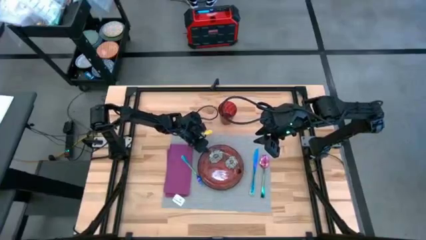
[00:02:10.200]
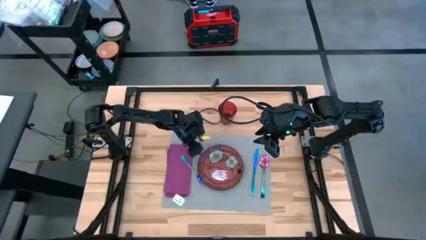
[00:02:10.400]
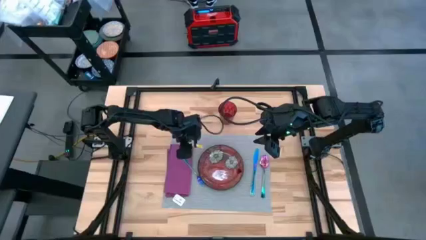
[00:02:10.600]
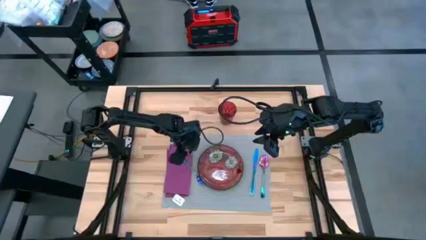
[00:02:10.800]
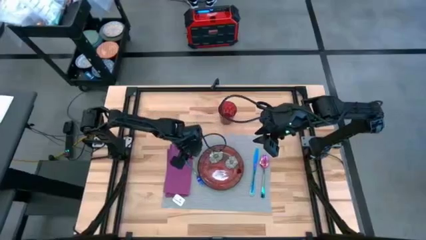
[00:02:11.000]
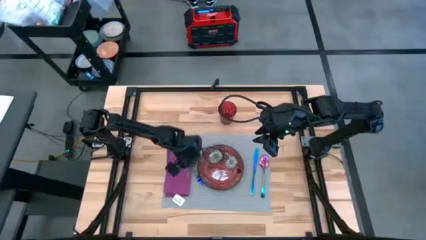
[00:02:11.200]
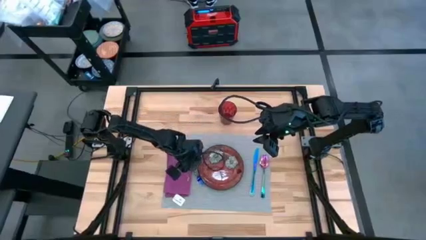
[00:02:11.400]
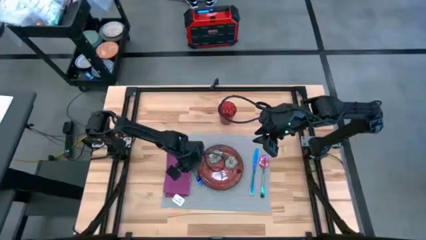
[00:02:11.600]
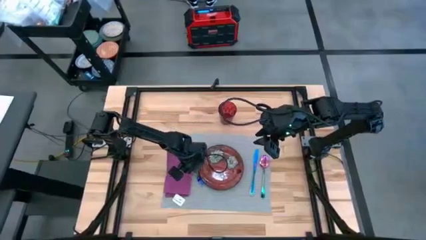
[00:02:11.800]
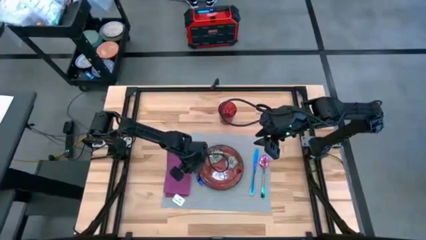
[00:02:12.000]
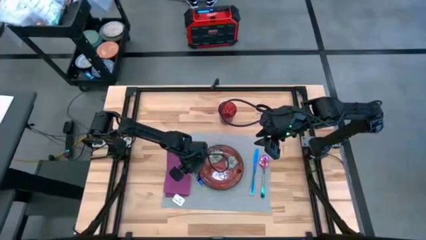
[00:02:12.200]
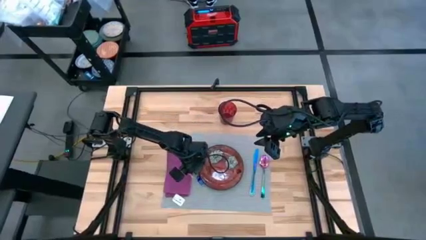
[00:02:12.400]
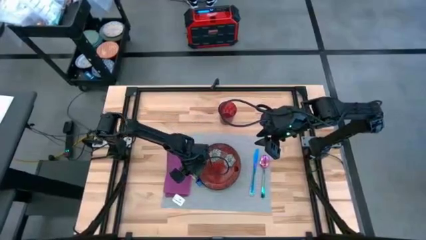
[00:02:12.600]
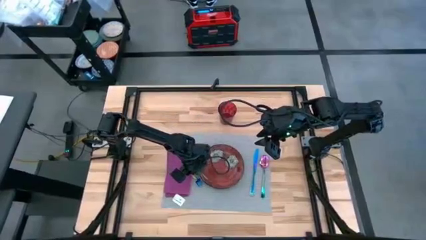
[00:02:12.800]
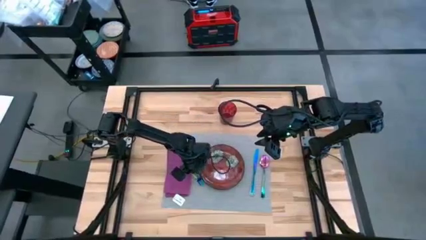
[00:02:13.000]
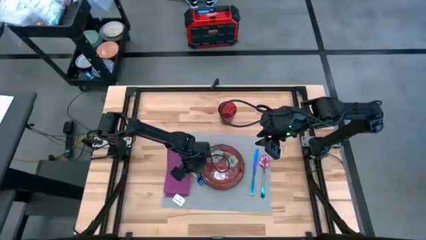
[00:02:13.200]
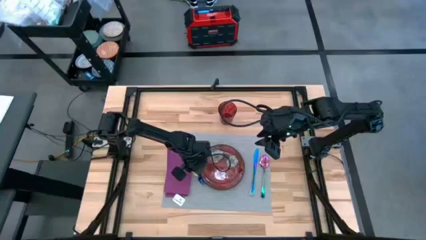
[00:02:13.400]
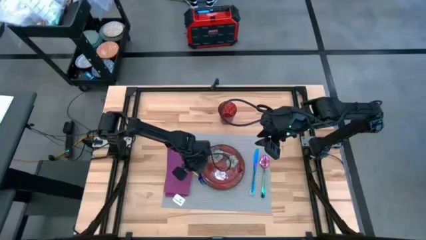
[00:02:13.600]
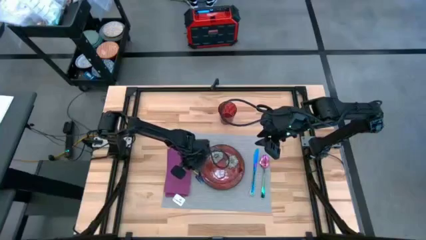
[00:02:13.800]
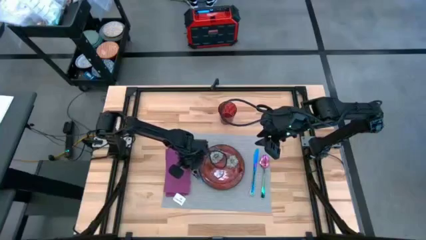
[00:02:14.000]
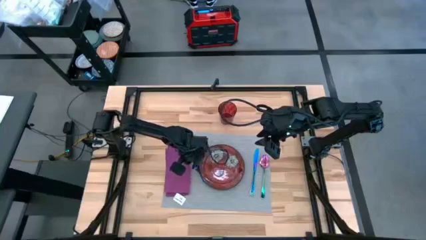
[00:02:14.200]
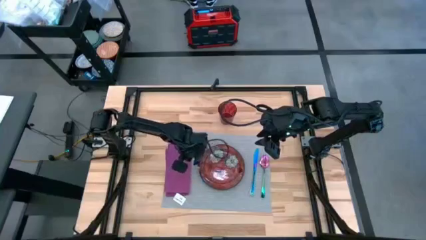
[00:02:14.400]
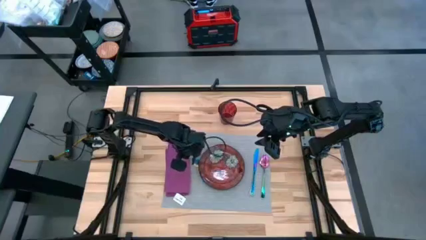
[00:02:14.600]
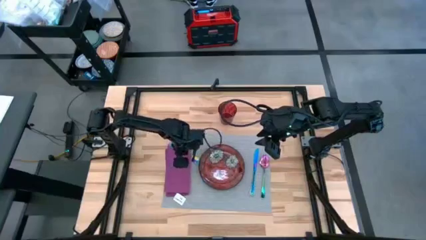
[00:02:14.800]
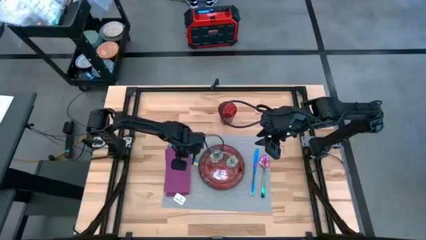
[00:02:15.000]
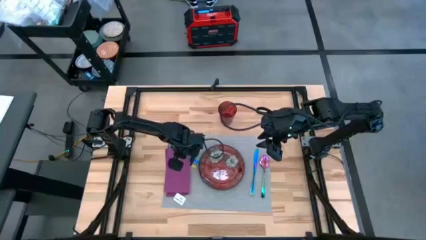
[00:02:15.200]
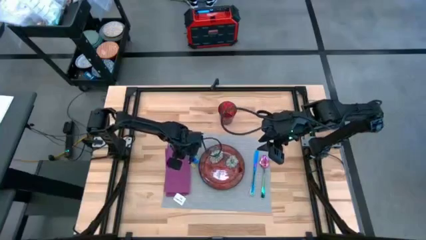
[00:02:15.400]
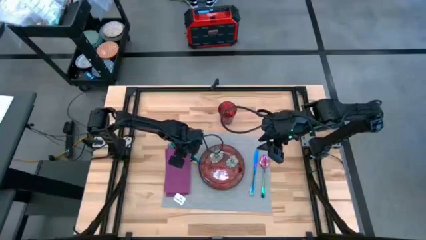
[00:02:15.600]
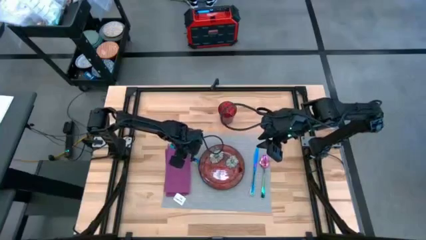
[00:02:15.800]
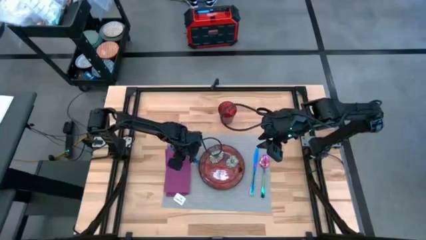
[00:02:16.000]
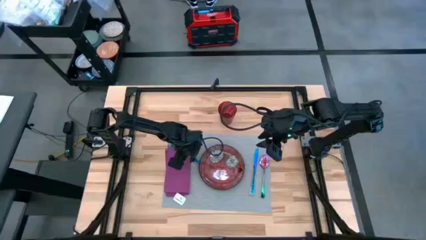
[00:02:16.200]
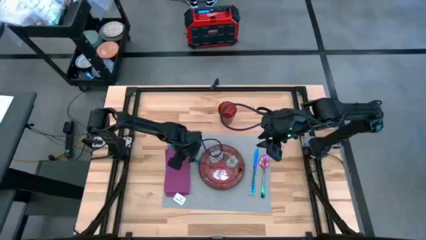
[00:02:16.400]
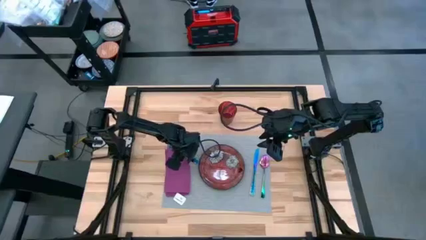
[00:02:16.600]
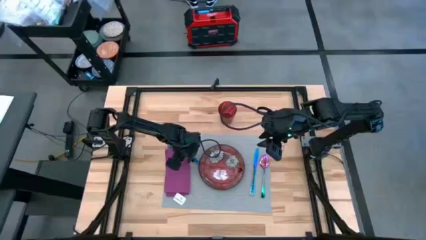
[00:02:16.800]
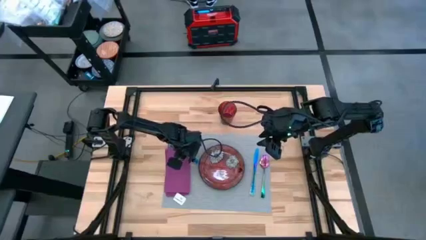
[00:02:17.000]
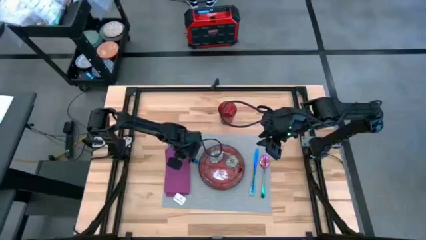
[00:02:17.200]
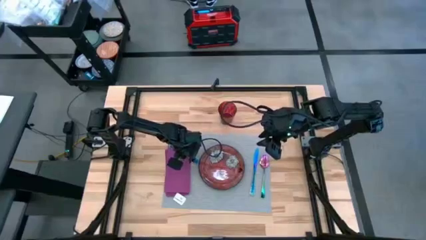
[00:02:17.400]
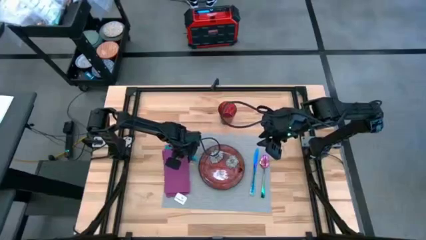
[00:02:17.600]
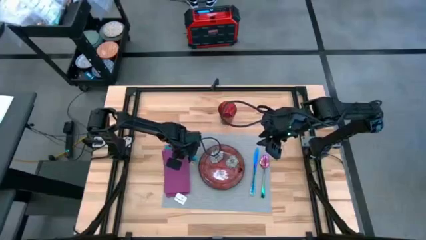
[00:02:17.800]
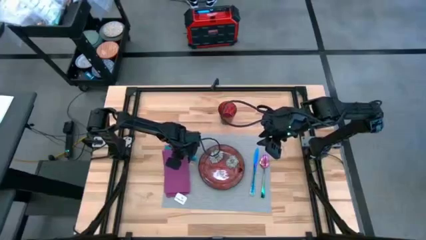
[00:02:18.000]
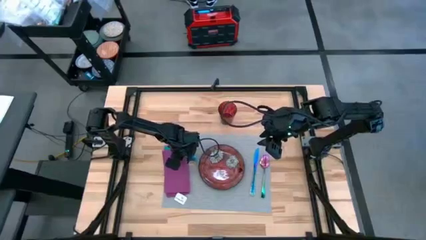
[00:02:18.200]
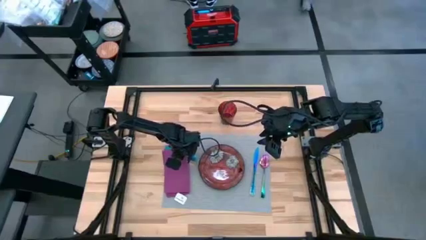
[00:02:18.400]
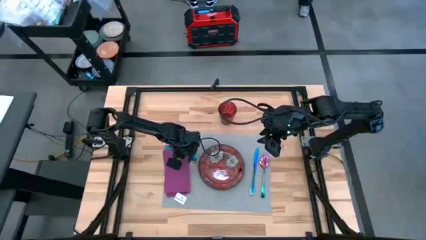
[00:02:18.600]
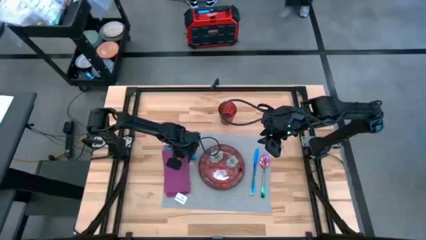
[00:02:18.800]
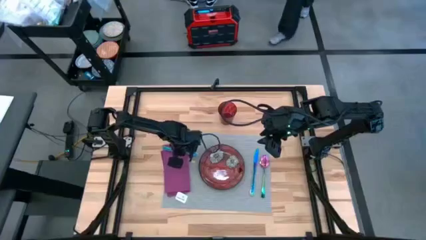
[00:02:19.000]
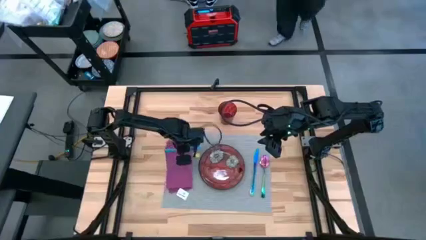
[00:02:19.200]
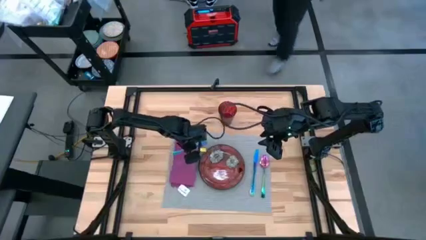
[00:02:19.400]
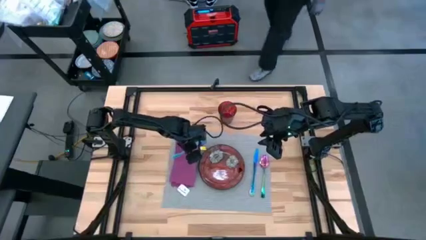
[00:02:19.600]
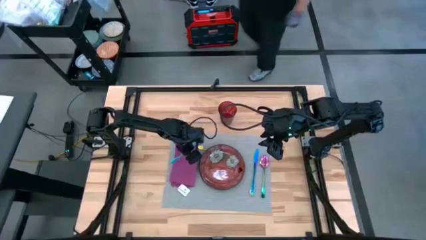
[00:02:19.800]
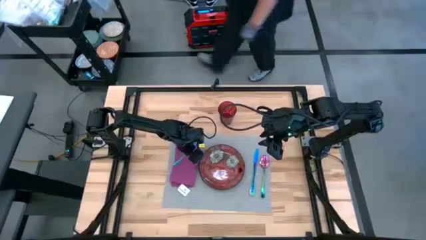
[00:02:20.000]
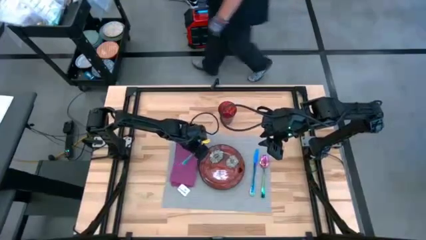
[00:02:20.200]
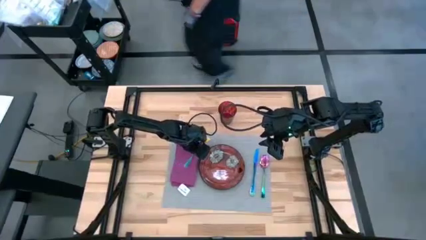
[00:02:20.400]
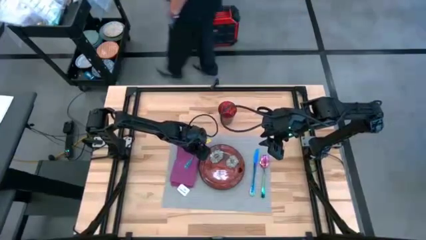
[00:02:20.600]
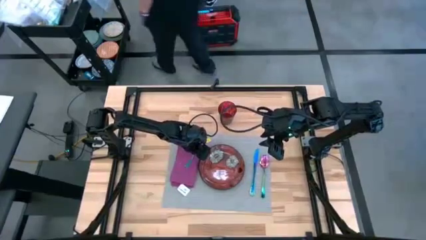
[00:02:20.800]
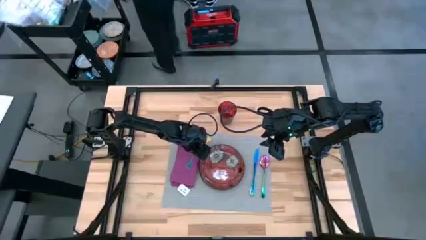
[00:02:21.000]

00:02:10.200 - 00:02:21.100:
Task: Set table place
Put the blue fork on top of the purple napkin

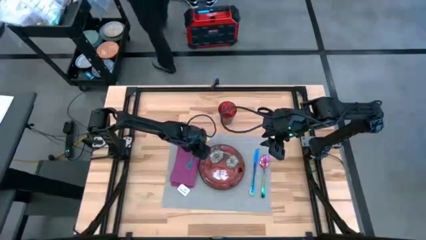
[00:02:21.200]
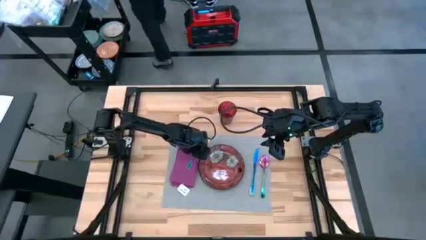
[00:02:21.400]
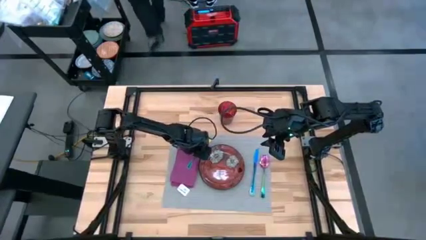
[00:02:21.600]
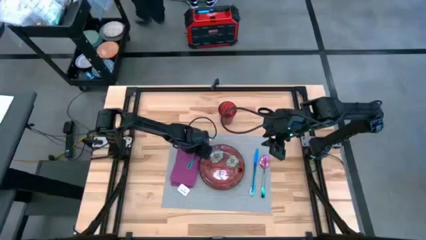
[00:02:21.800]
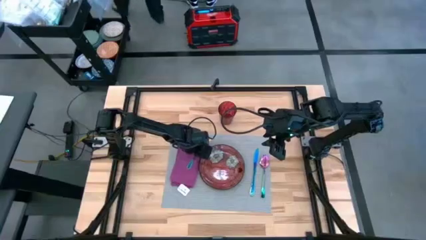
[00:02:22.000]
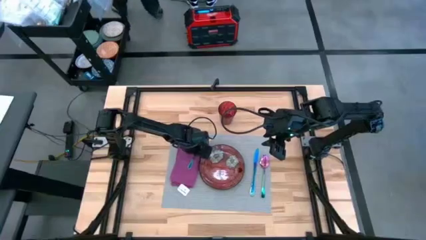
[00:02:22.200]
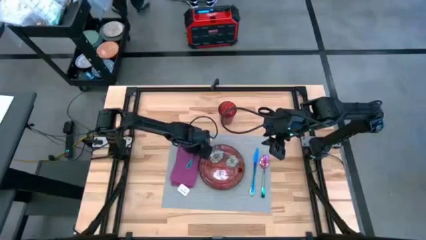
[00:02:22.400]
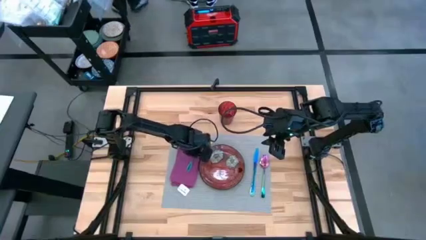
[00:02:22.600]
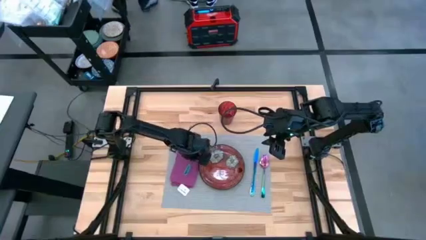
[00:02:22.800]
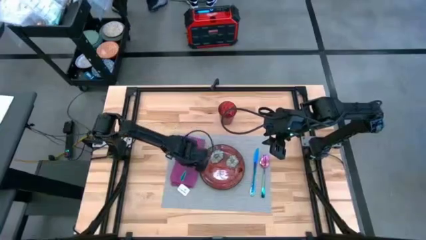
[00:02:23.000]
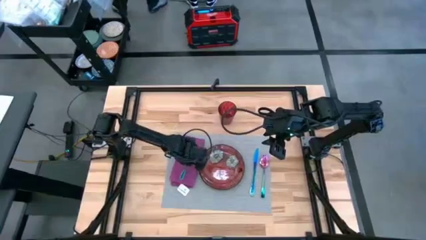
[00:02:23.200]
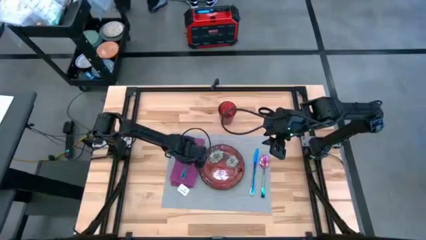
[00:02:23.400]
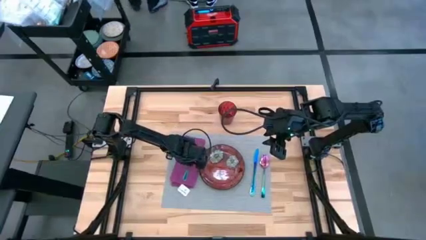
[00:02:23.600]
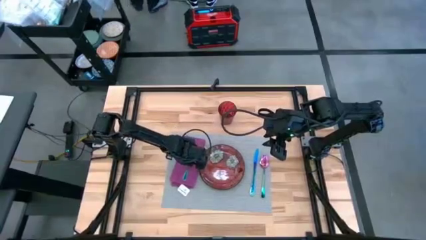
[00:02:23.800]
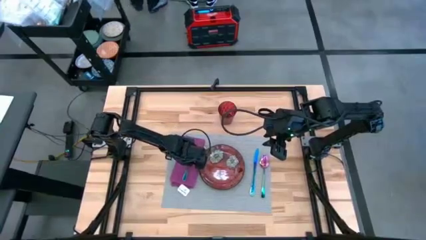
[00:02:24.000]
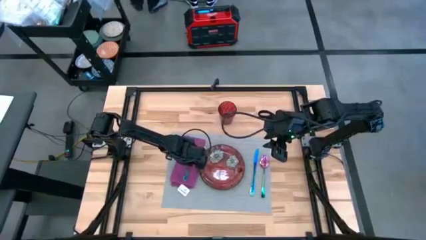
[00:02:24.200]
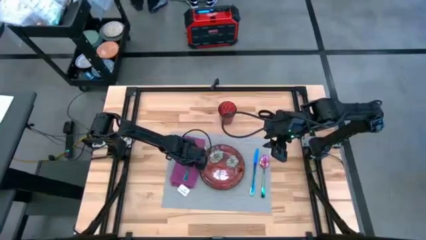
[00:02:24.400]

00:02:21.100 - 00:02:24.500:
Put the blue fork on top of the purple napkin

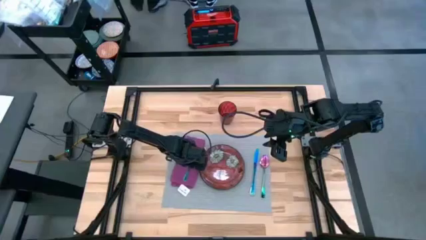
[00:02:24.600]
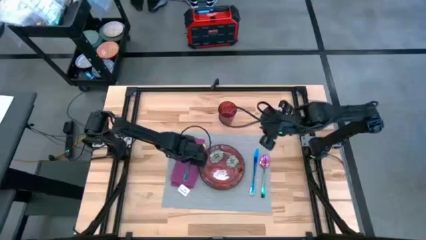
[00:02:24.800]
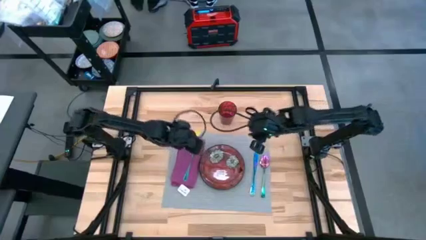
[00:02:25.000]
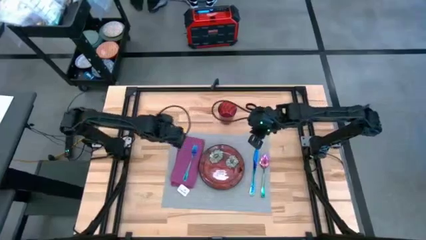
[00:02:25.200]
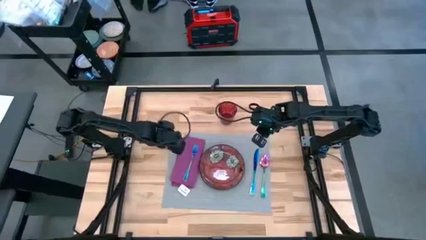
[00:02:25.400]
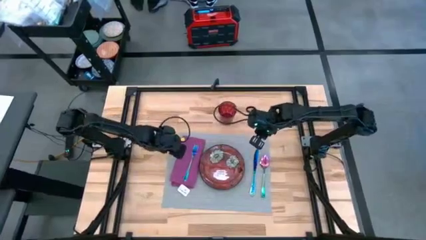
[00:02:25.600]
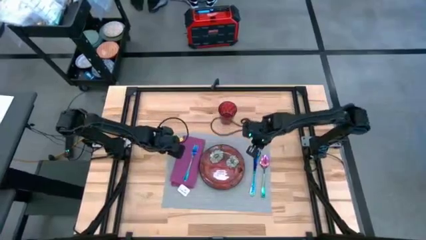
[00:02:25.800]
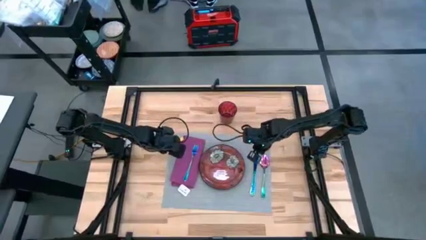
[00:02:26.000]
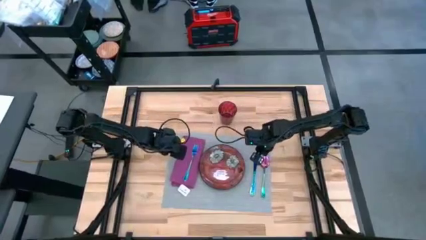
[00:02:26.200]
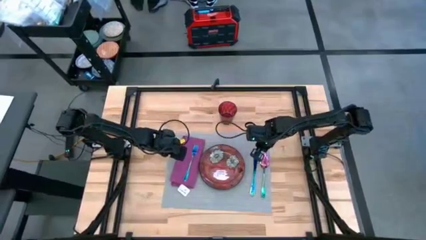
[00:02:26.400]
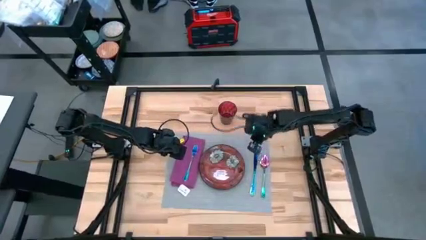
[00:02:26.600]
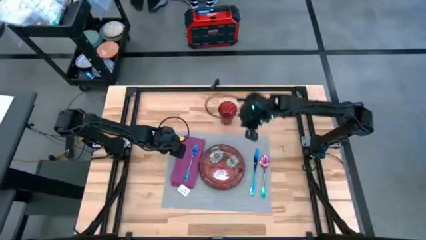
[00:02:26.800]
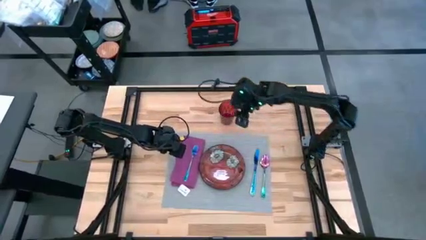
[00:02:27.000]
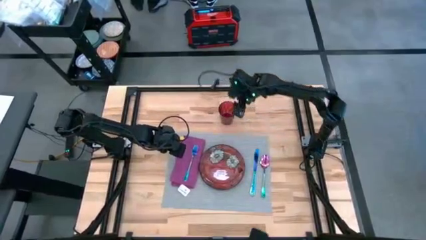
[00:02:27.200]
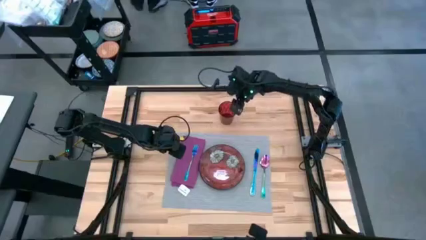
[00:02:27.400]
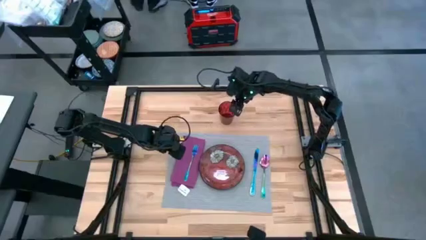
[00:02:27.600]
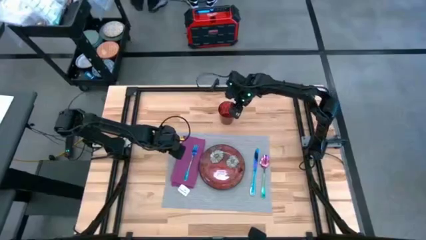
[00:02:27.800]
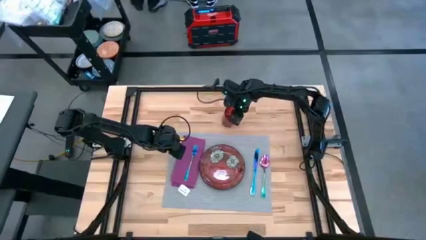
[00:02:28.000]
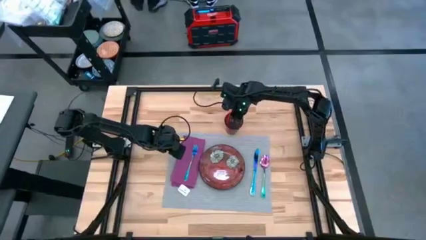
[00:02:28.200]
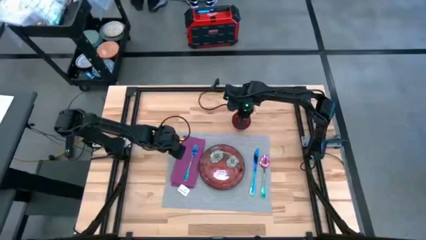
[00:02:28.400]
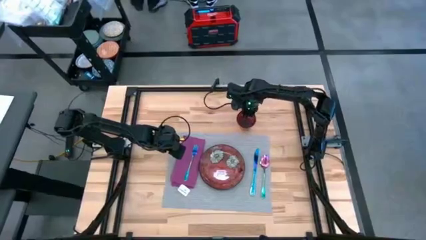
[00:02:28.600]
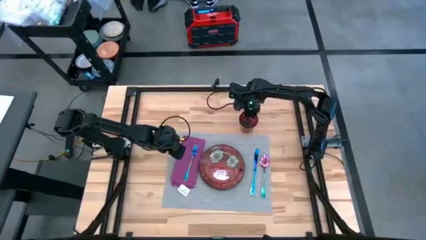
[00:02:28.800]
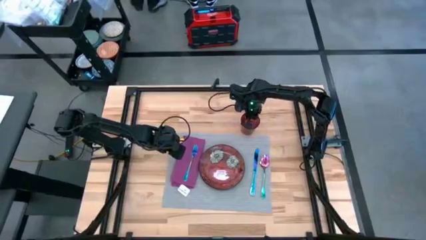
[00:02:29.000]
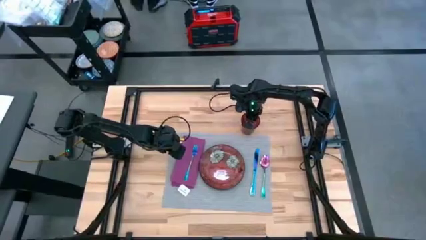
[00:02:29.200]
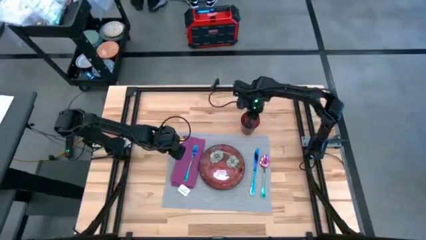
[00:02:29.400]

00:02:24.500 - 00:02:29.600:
Move the red cup to the top right of the table
